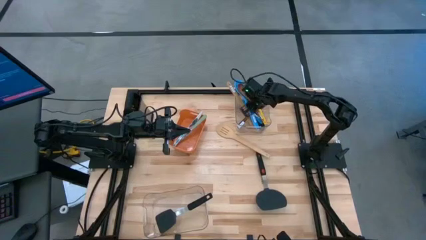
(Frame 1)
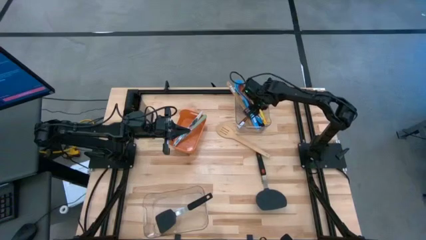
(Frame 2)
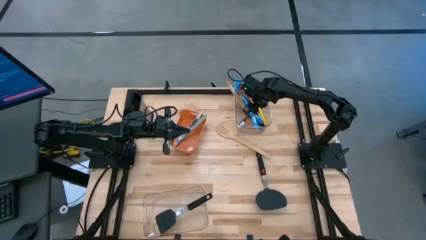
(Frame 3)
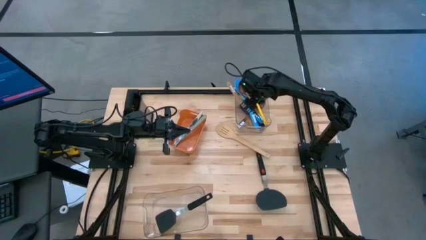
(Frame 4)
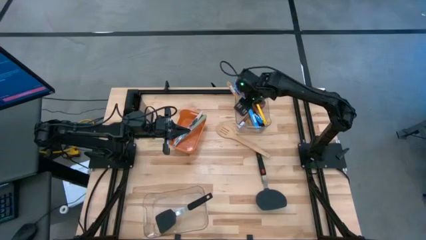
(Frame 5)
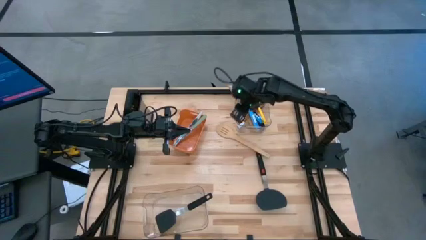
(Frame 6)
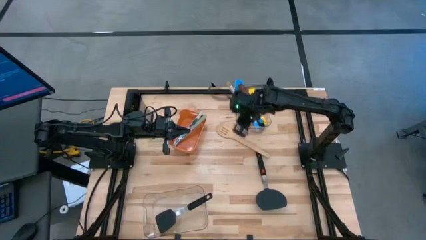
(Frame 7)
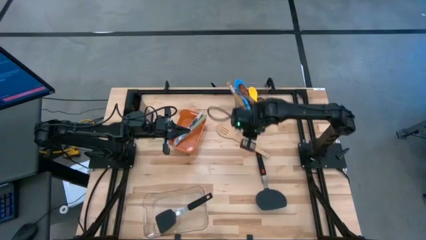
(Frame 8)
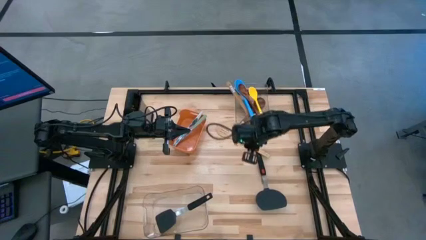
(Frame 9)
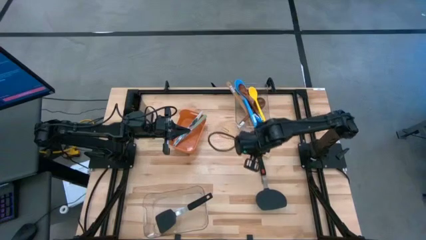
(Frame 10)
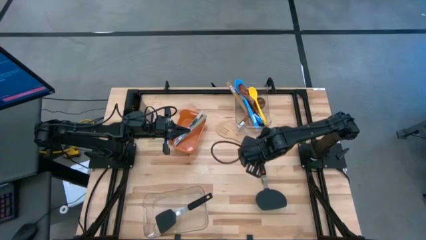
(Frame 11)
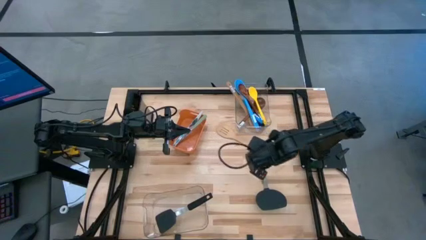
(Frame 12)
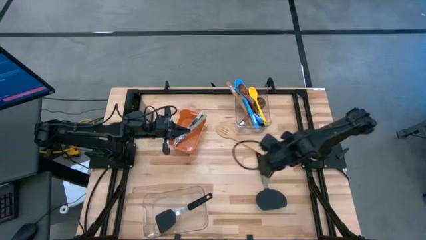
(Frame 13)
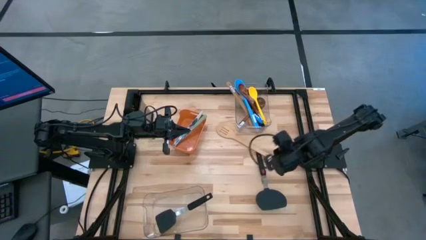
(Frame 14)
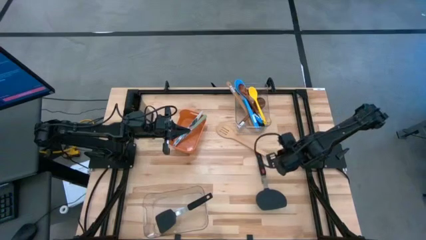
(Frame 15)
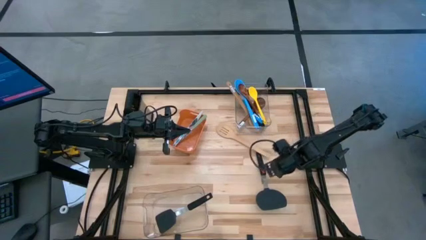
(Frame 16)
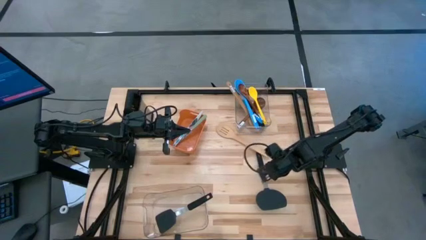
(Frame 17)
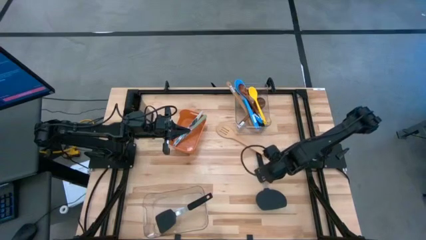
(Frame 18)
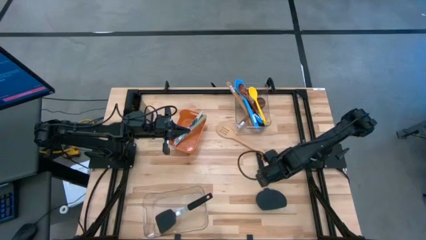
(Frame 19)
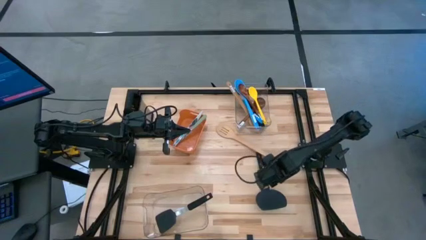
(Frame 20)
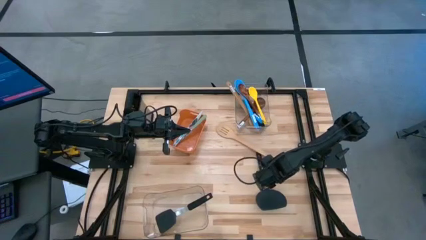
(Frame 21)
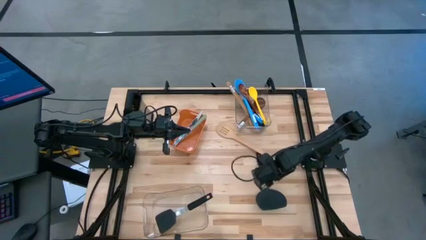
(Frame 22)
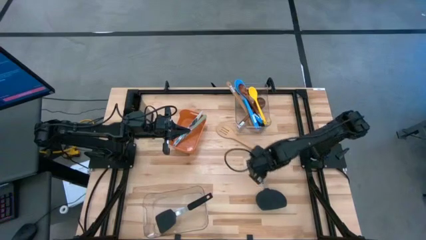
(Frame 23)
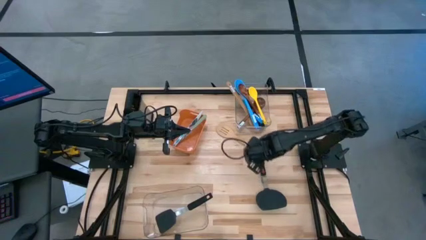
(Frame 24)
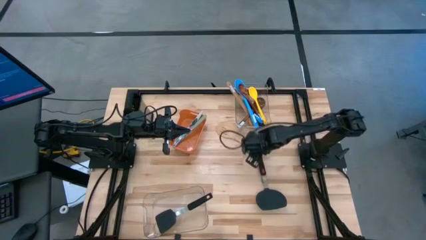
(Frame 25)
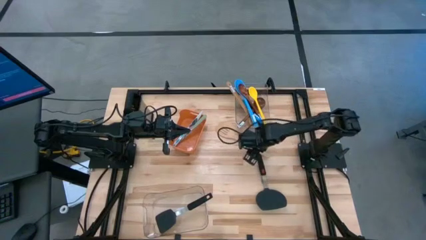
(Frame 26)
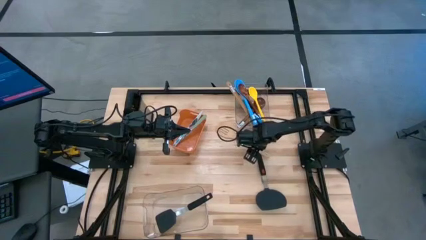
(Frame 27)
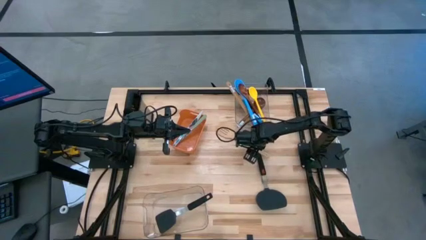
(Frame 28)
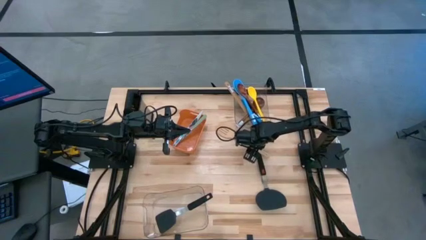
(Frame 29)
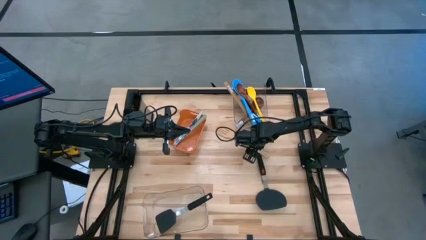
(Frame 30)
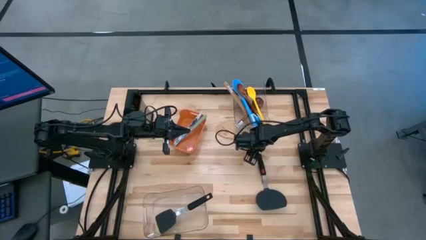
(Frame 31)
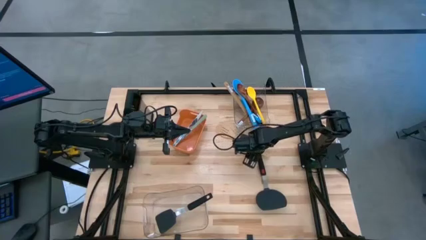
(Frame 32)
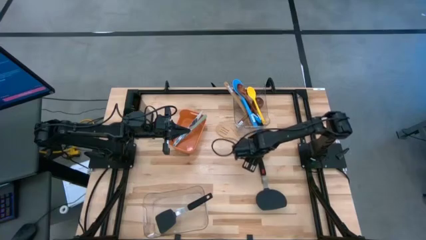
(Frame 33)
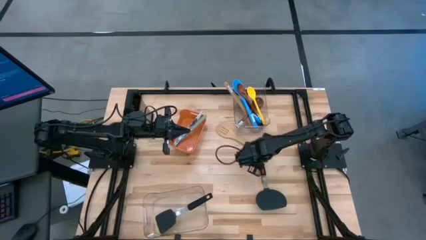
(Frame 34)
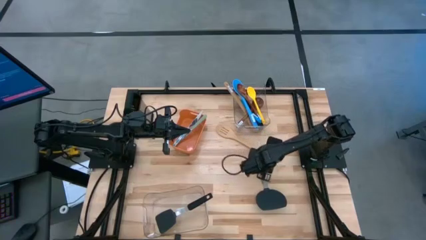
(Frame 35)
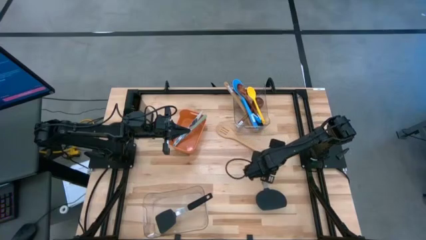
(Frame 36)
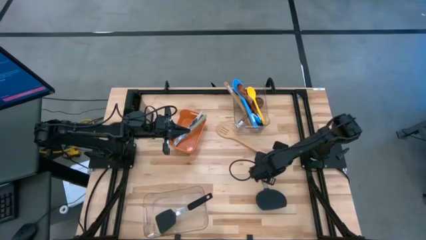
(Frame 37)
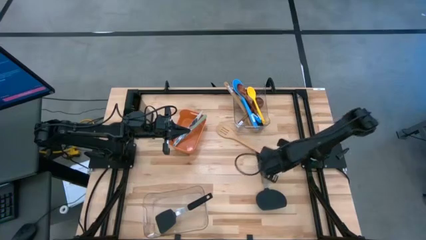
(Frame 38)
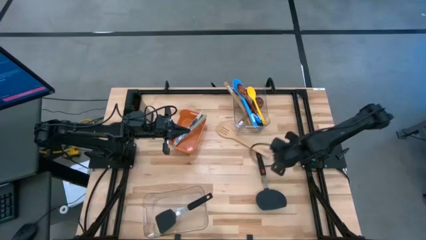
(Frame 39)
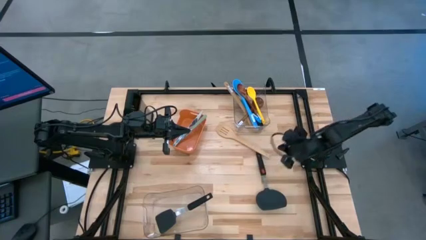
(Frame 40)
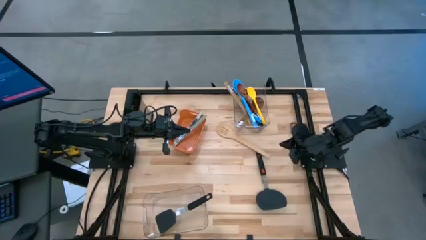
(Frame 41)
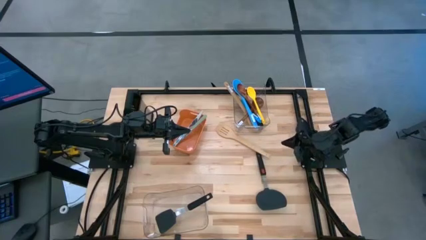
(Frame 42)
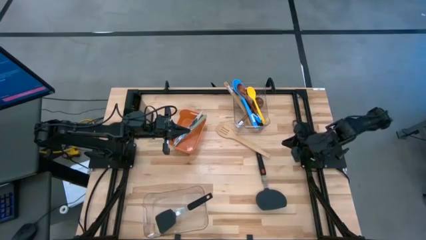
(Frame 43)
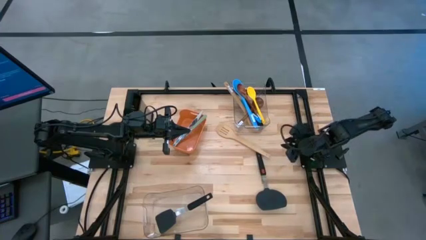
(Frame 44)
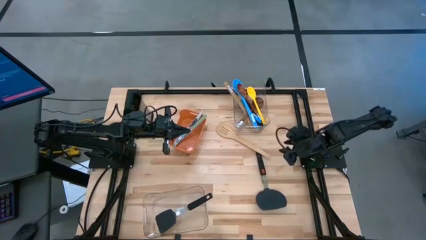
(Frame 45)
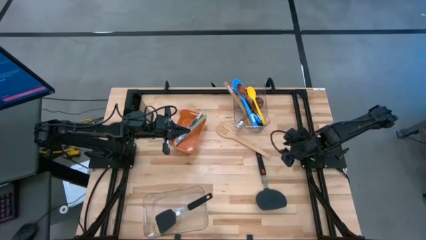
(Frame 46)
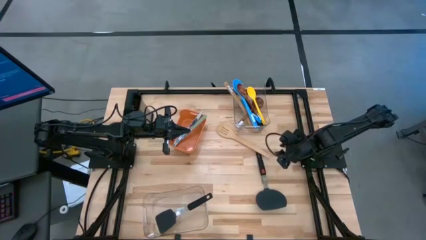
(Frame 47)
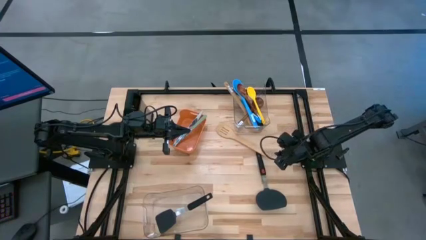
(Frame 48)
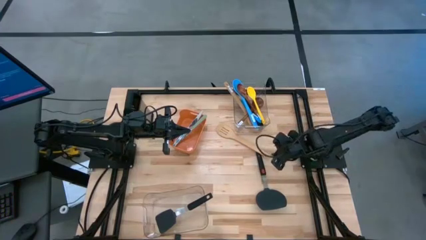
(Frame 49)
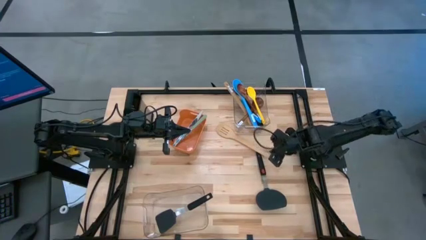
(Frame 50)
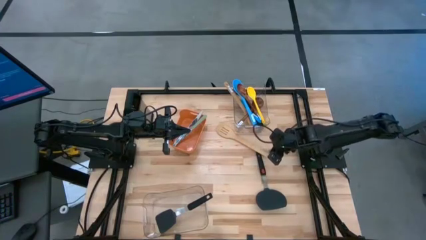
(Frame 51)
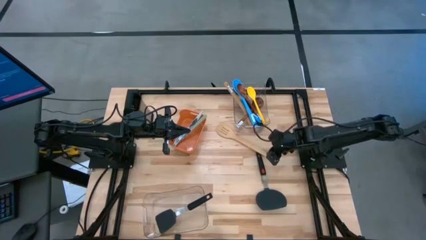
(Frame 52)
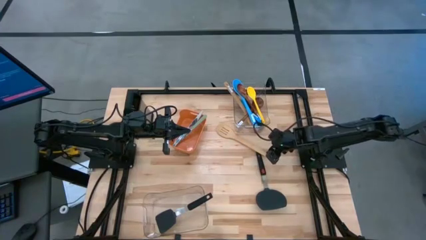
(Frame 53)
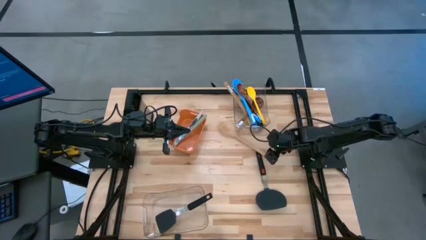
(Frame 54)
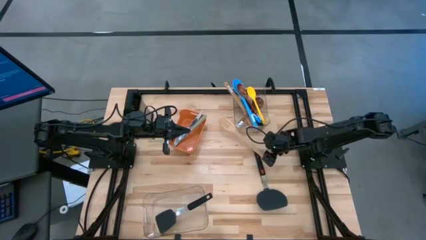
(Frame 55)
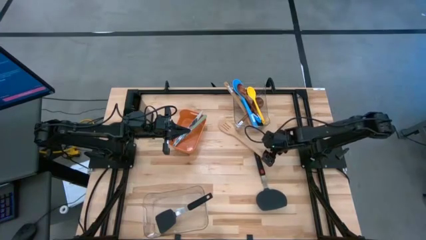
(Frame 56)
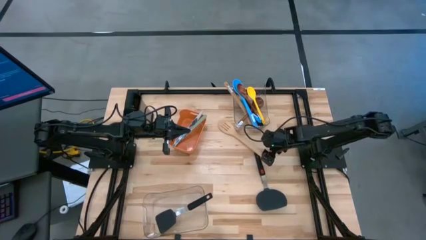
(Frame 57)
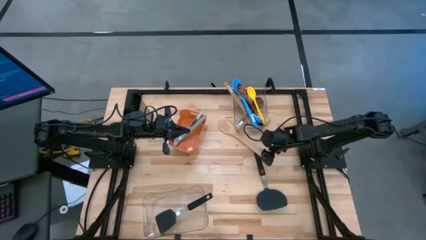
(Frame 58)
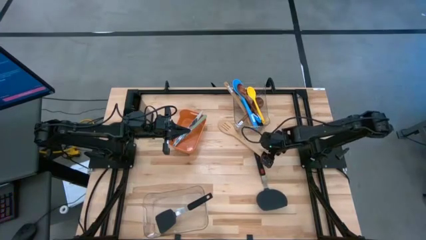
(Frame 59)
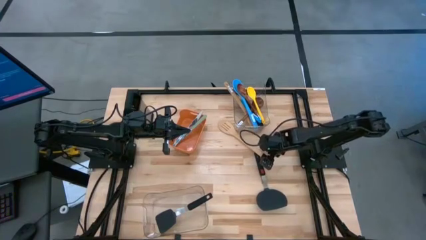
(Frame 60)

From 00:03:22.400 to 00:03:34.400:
Task: Pick & Place Kitchen Items
Put the brown spatula into the top transparent bin

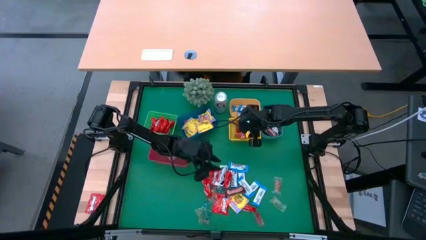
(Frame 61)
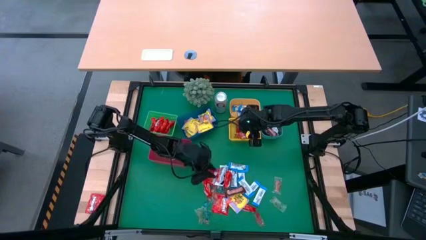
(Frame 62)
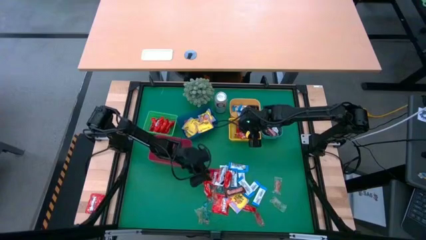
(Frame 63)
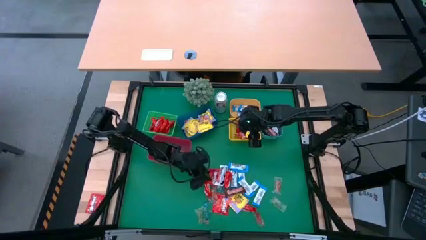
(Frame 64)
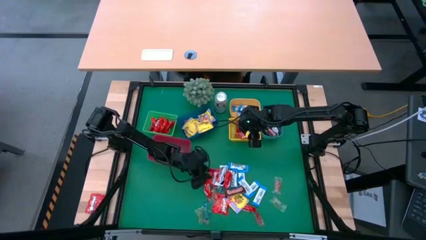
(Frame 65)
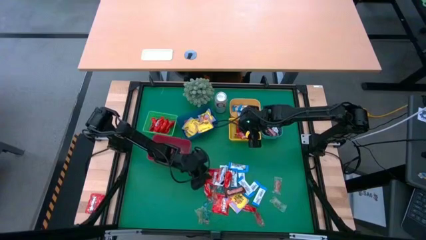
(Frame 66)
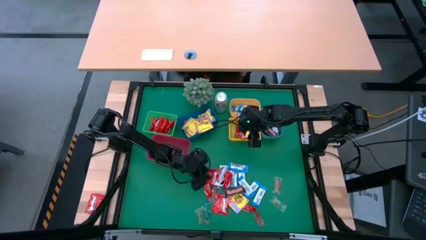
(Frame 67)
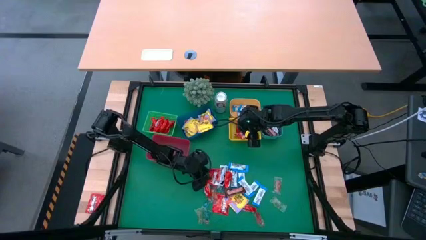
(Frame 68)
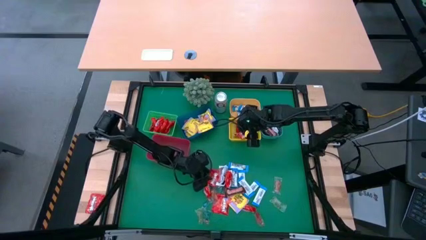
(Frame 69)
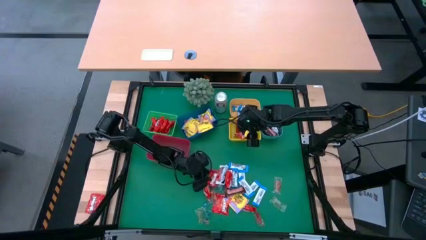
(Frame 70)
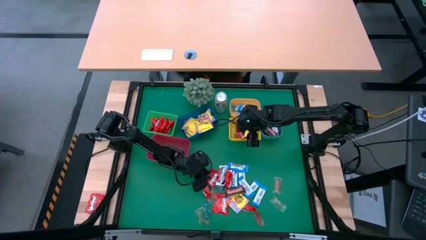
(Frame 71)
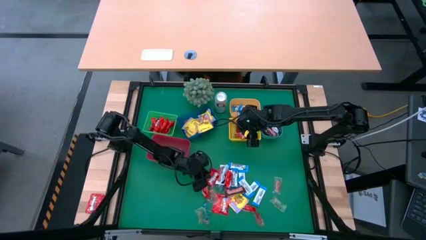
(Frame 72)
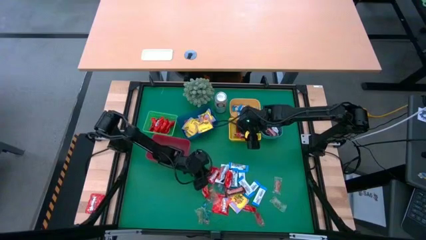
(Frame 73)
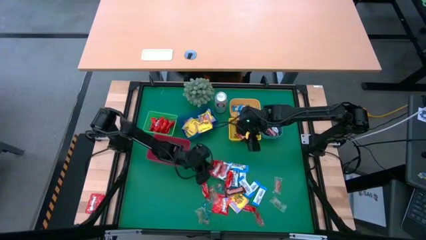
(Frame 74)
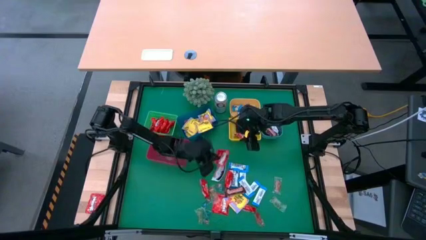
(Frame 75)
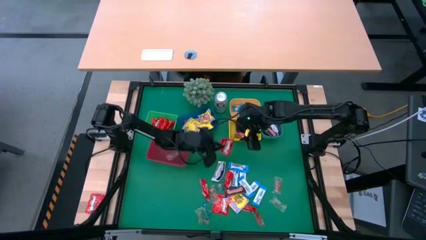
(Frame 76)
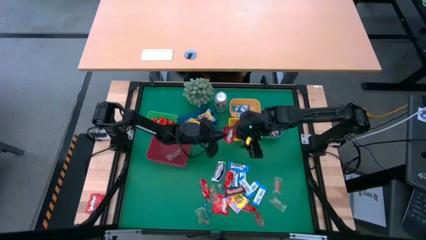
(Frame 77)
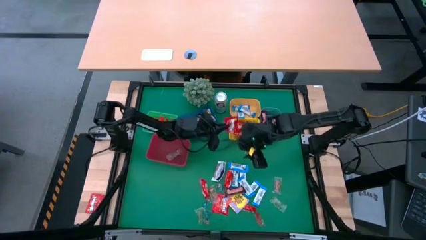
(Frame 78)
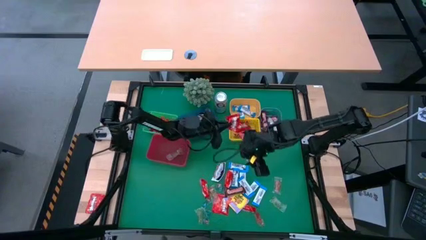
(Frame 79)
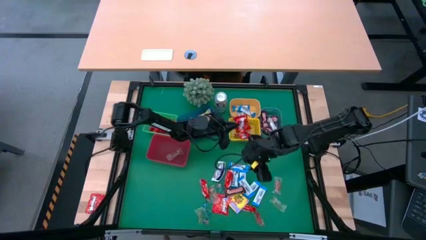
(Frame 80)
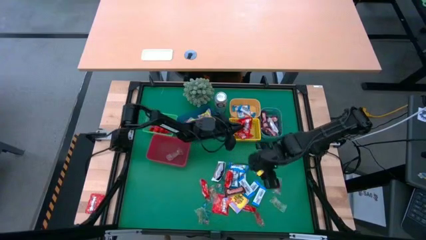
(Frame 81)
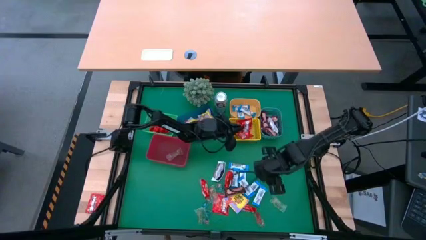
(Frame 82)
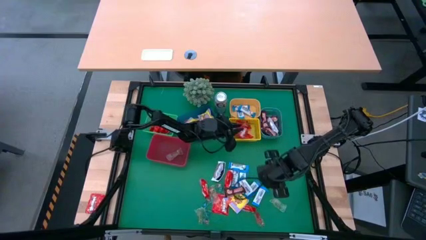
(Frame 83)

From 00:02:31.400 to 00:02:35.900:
Task: Sort candy
Put the red candy pack into the yellow bin
